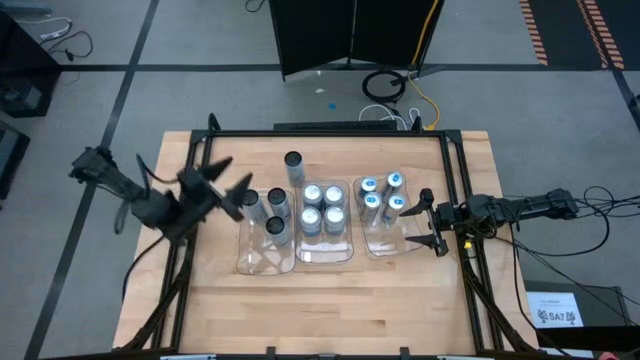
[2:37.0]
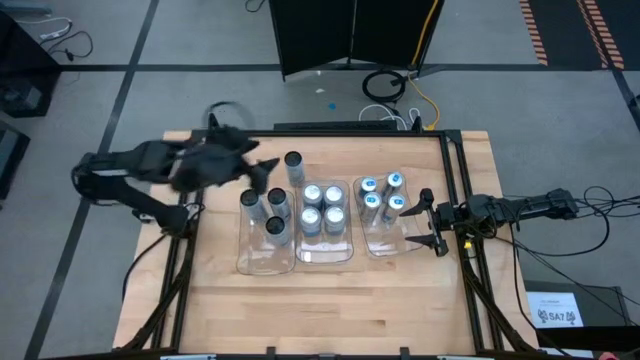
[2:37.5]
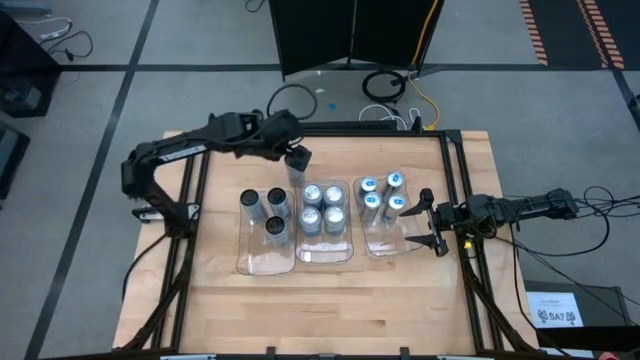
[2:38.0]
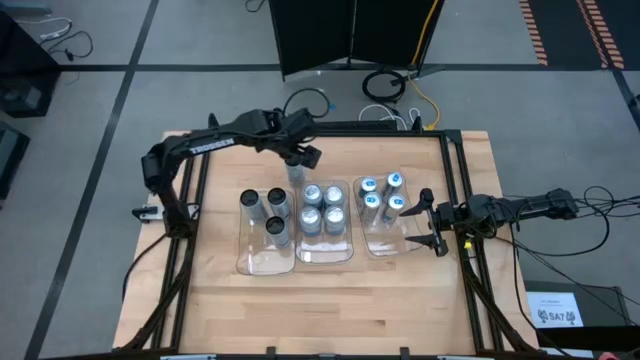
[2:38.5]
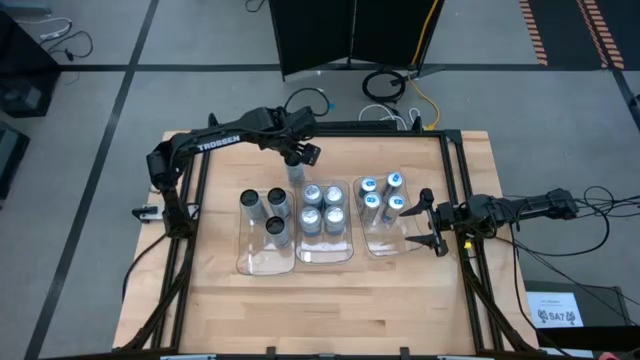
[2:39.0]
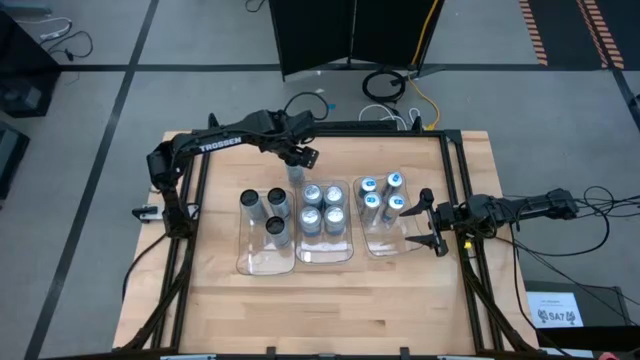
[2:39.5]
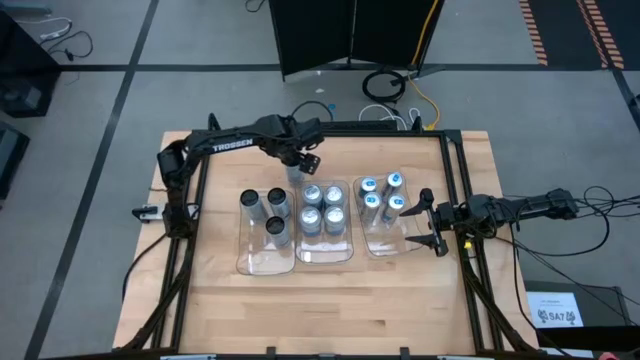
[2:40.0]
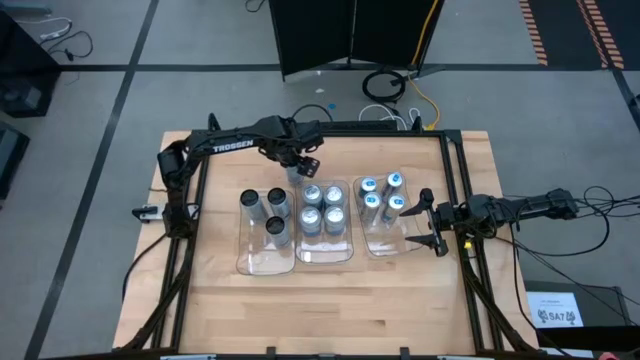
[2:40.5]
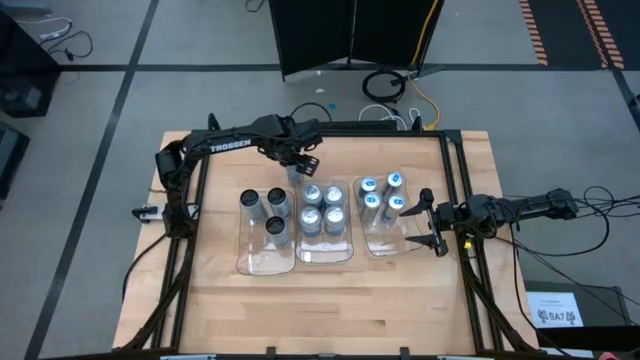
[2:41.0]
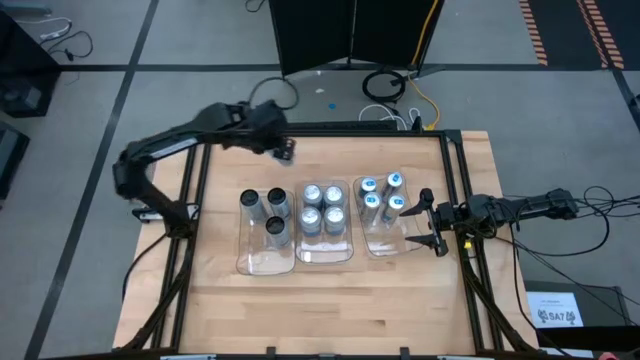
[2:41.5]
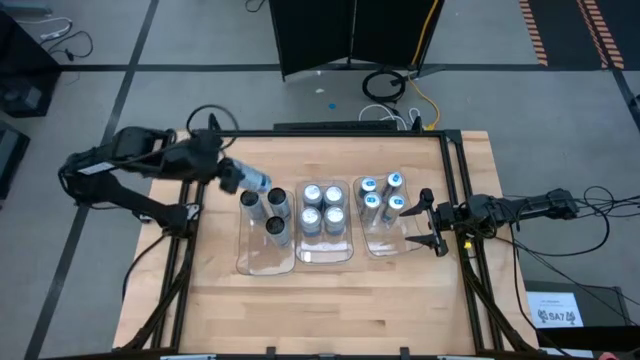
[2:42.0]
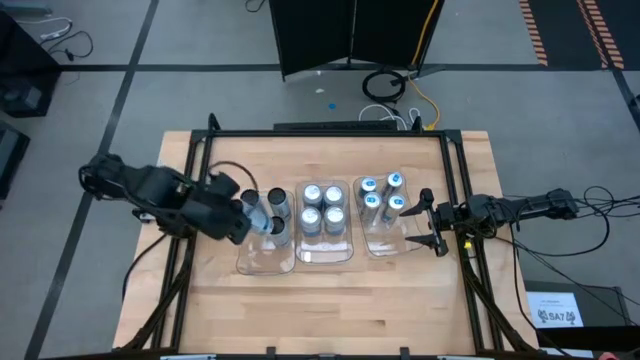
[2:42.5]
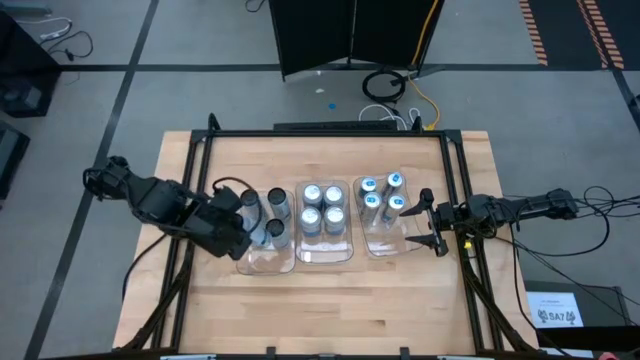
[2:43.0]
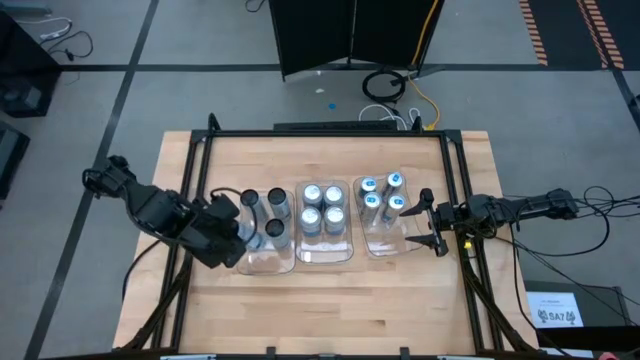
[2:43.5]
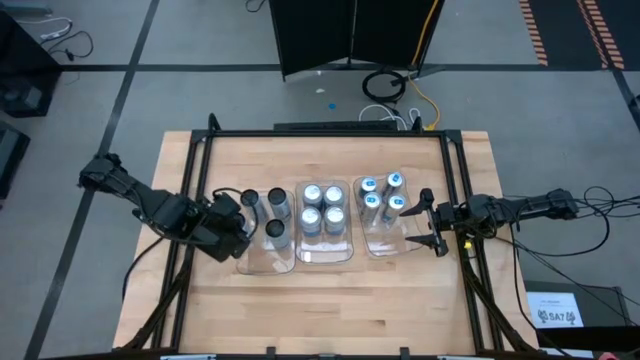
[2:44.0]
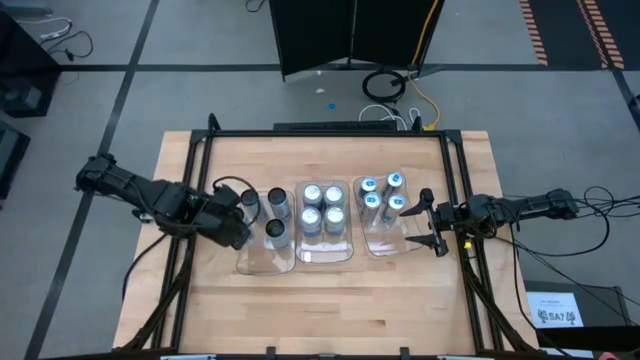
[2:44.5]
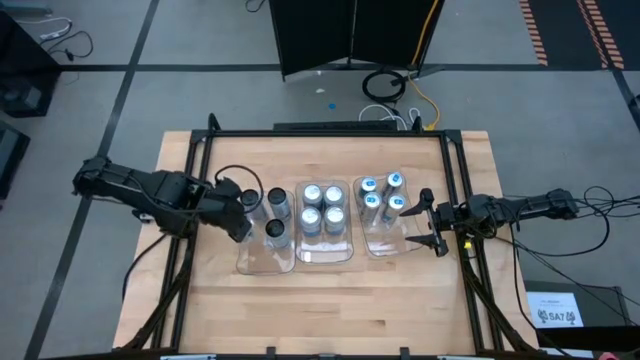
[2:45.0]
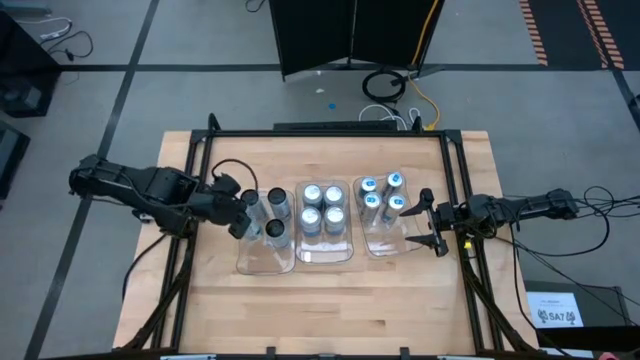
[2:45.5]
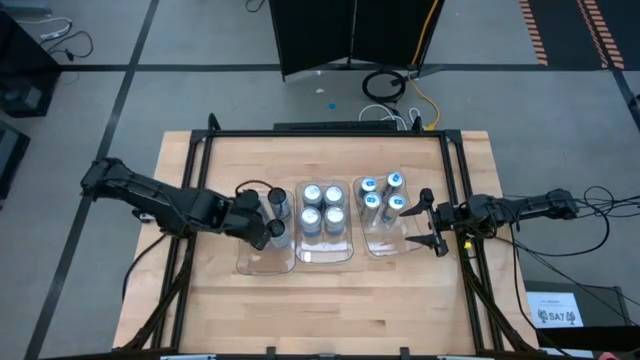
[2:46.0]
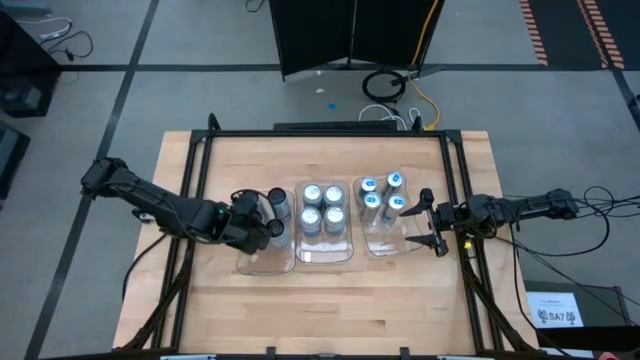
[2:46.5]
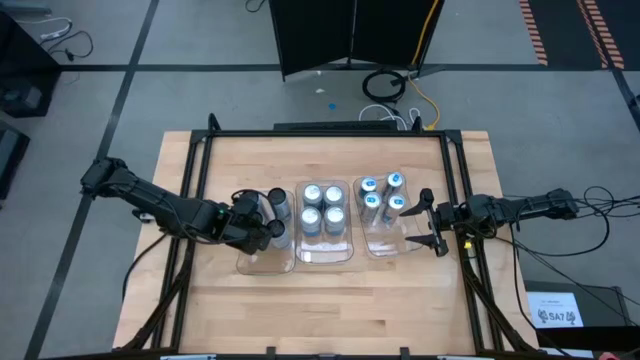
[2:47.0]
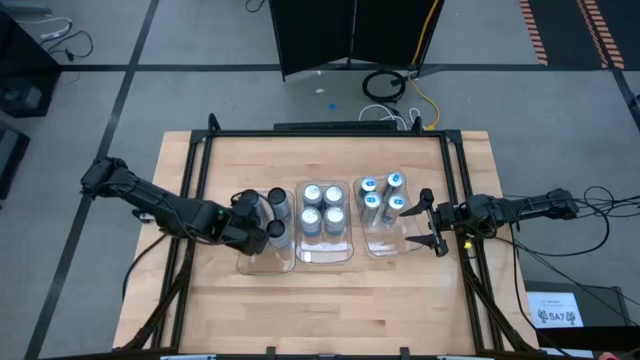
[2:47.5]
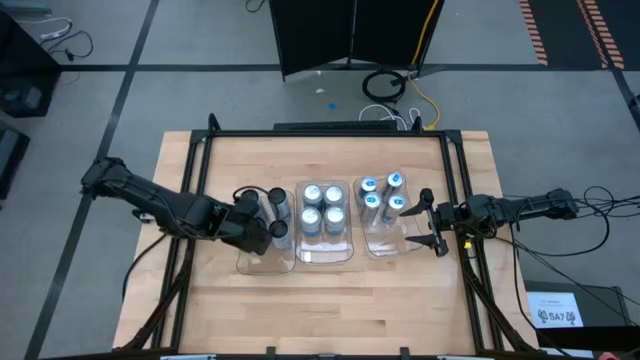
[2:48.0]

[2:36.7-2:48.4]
Task: Sort soda cans
Put the white soda can into the left transparent bin

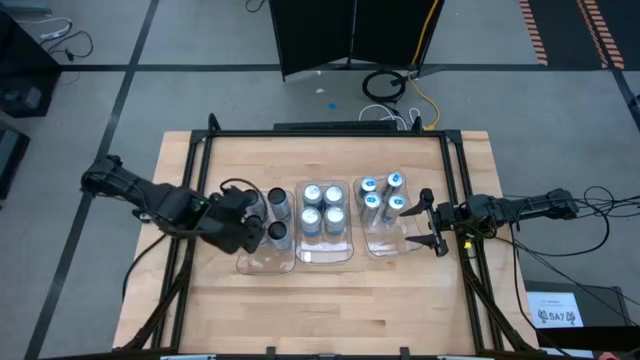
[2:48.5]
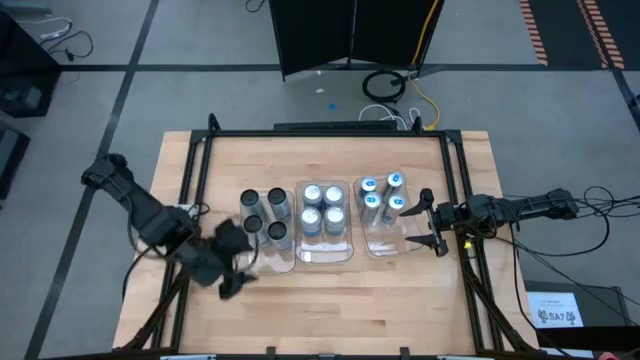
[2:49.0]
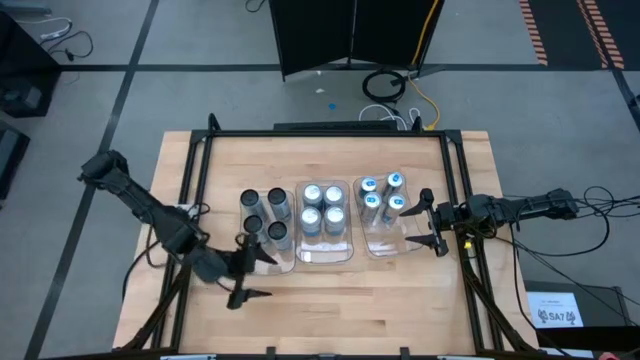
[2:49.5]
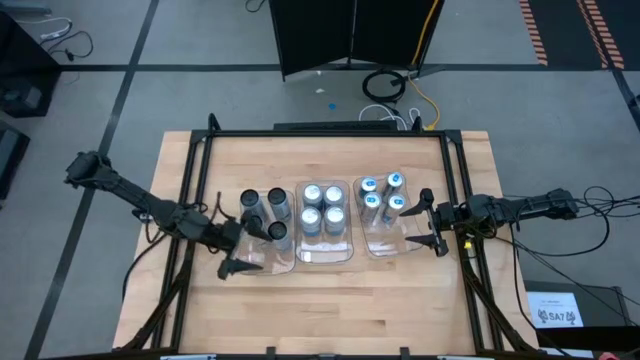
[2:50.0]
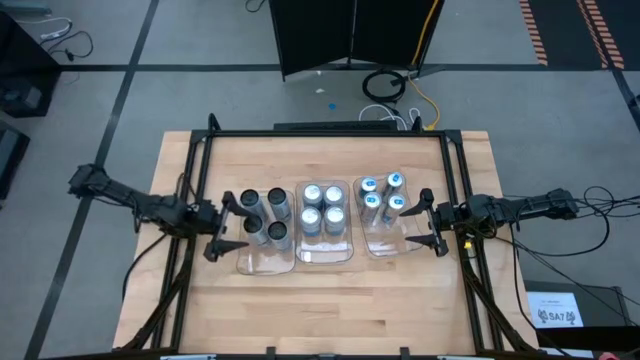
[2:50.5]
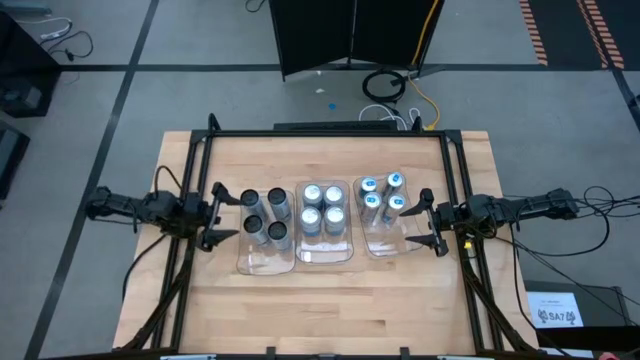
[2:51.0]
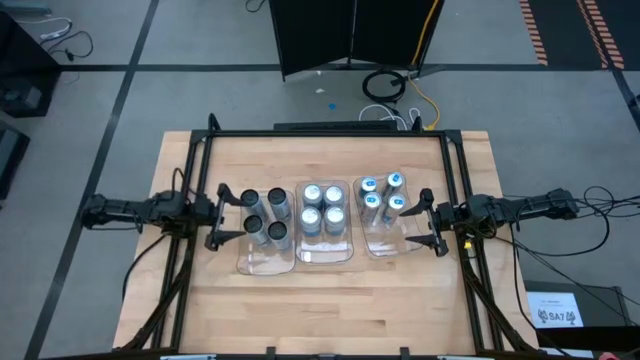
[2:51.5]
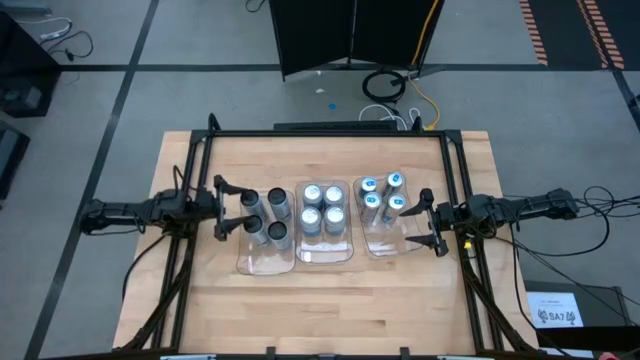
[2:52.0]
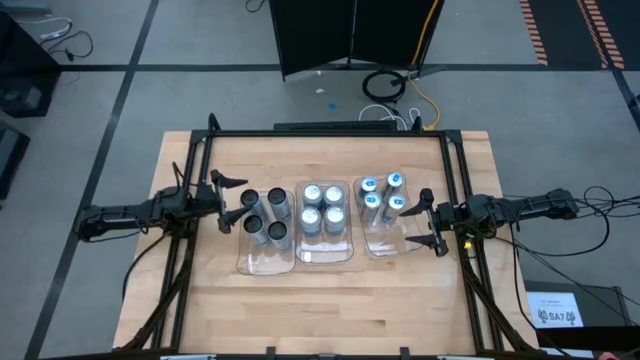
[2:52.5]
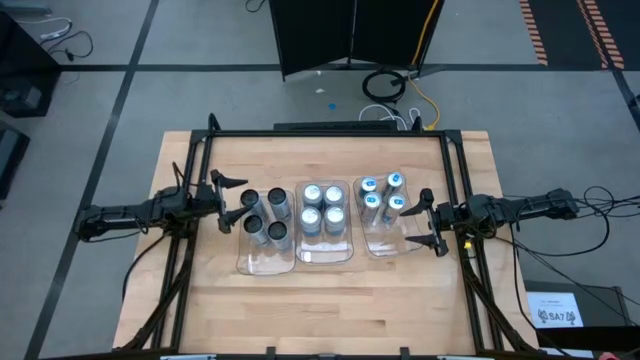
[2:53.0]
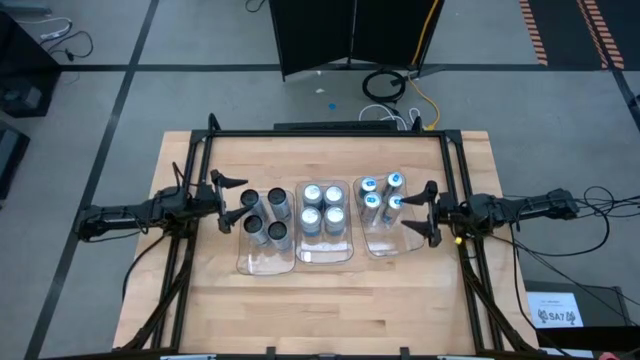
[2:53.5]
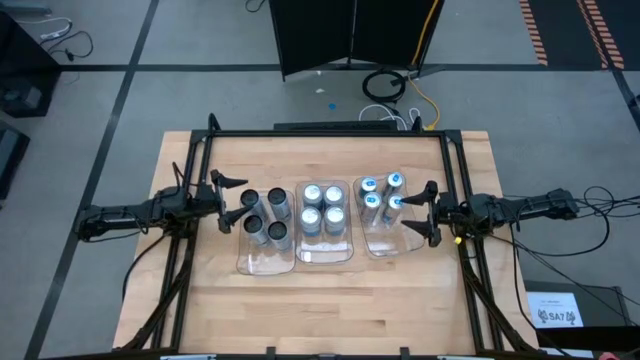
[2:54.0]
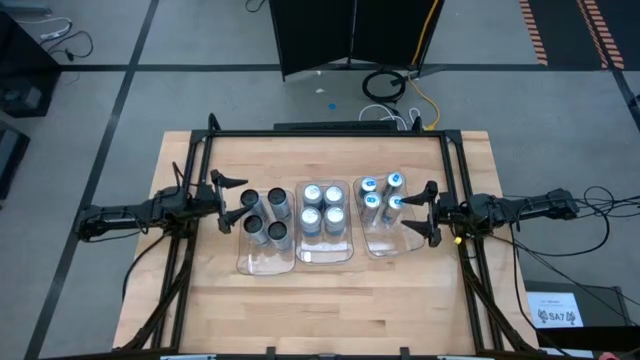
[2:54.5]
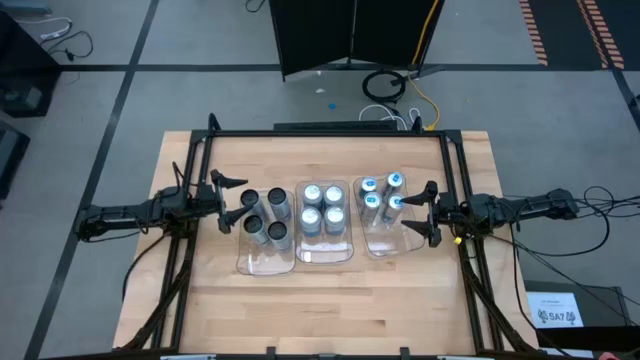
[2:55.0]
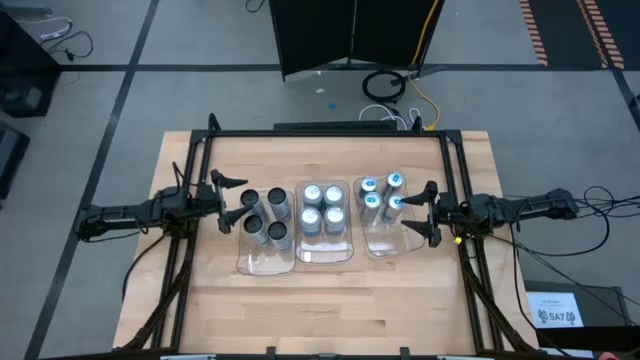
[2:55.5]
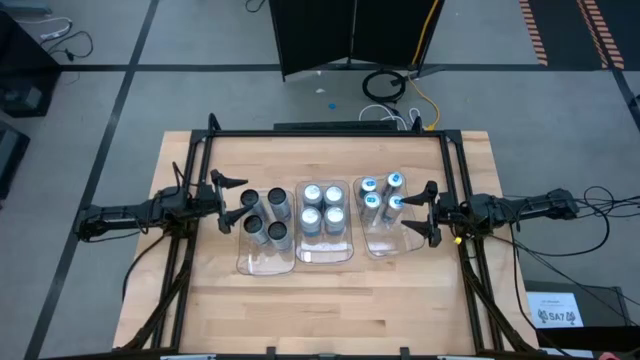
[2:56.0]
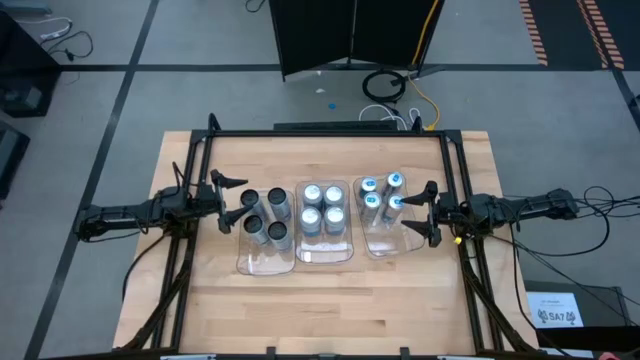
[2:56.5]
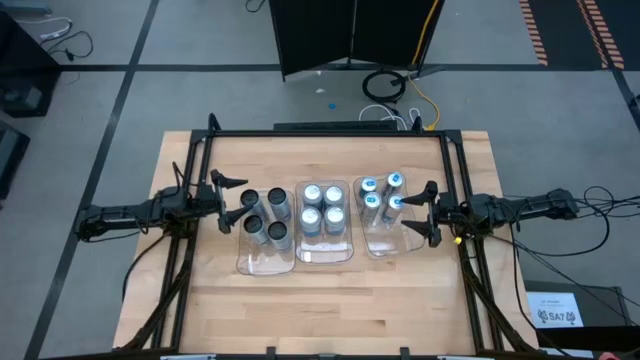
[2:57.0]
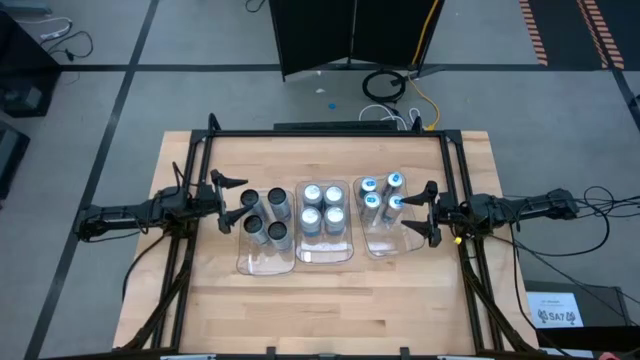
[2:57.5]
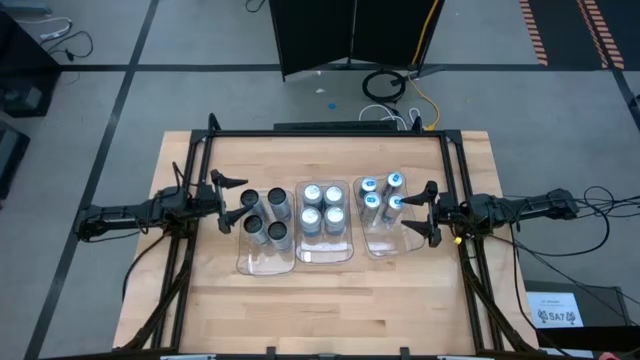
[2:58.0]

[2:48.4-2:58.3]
Return to Home Position
